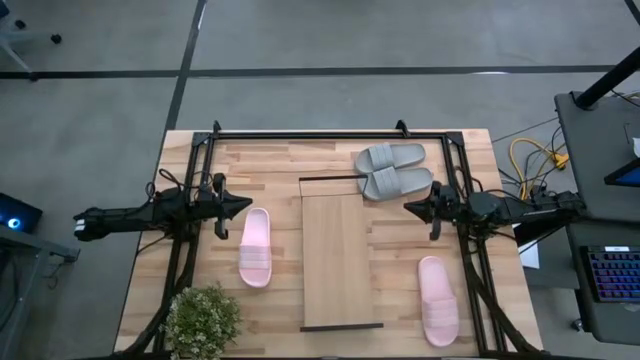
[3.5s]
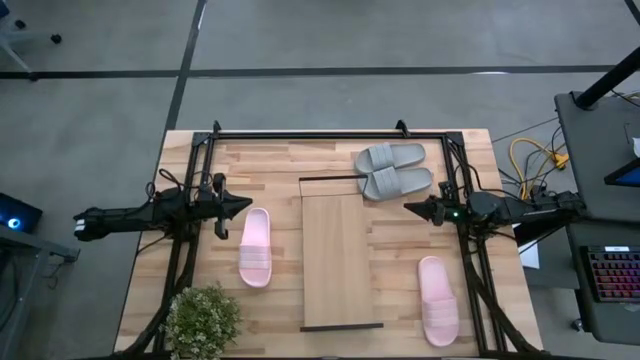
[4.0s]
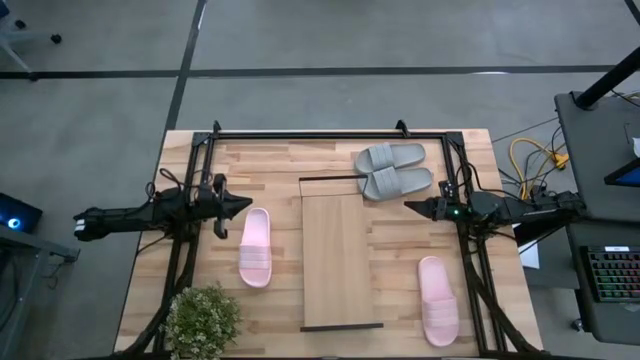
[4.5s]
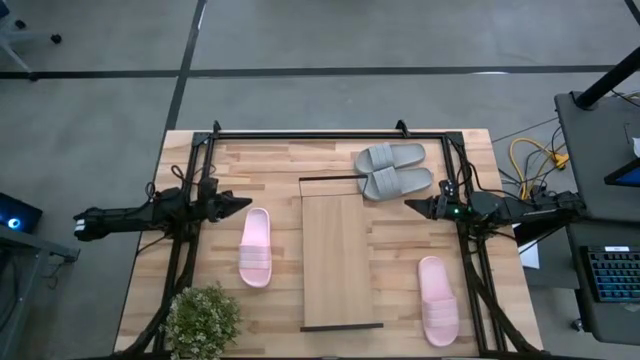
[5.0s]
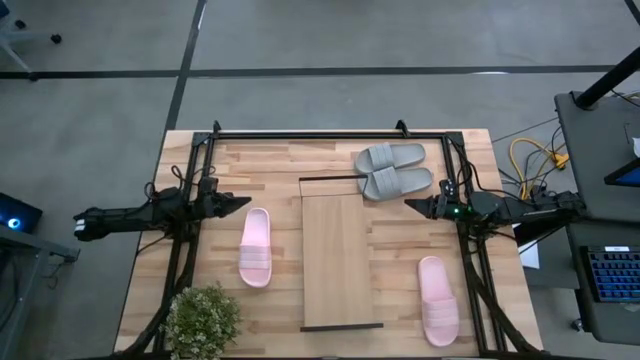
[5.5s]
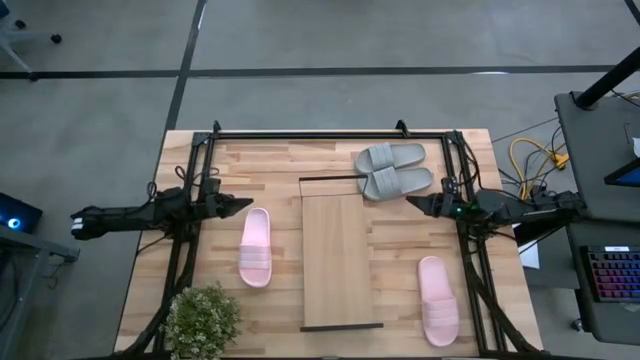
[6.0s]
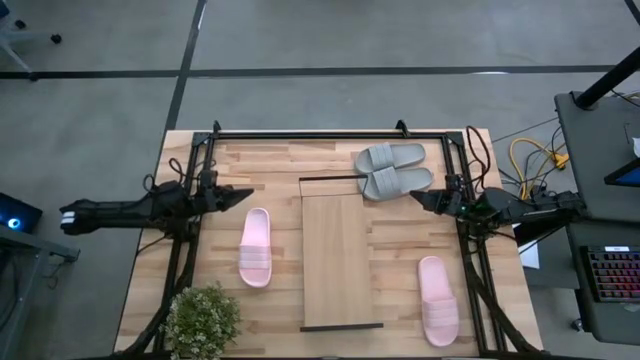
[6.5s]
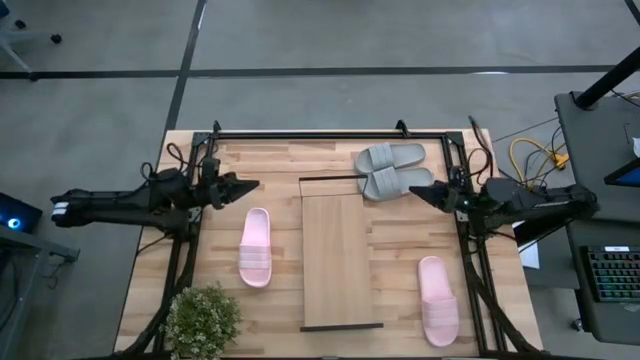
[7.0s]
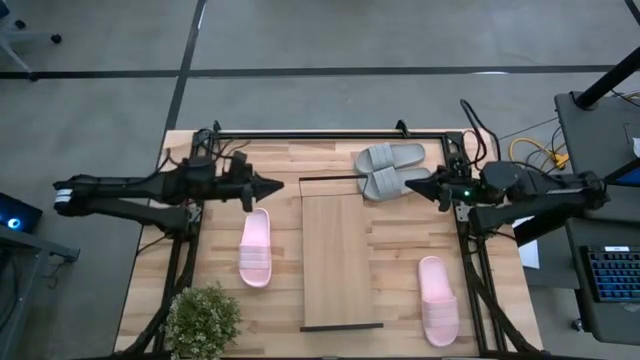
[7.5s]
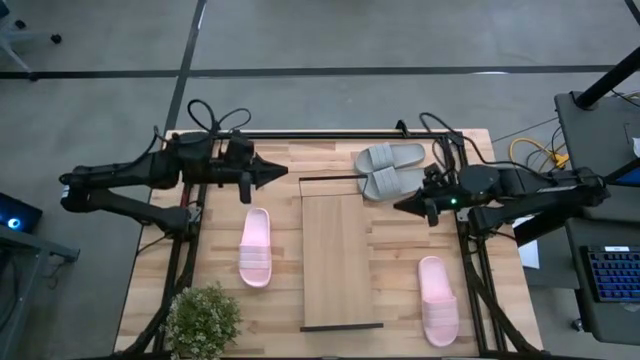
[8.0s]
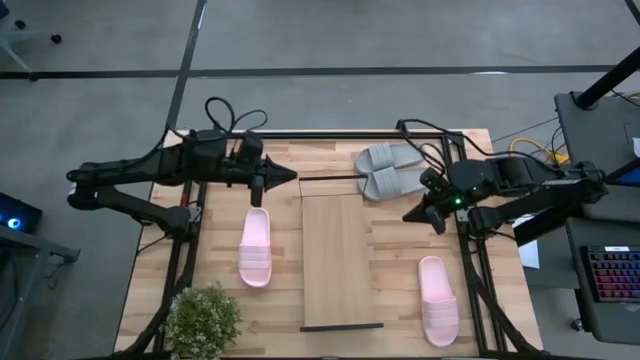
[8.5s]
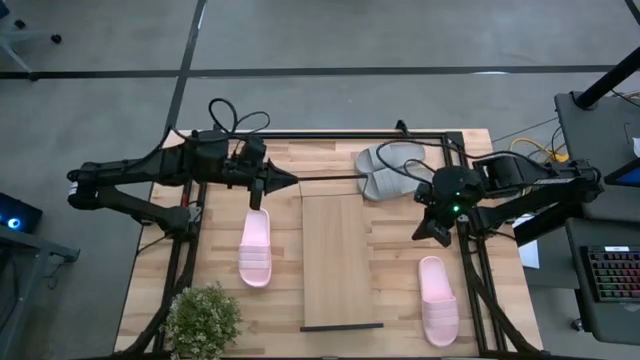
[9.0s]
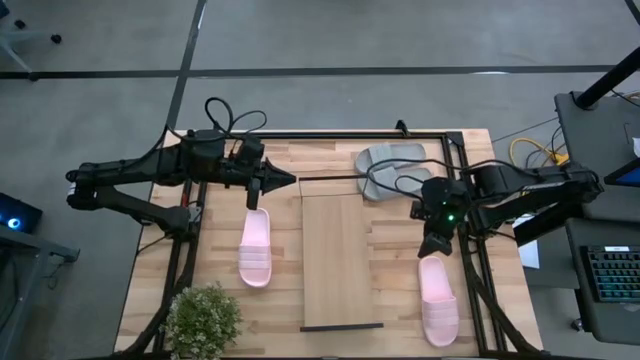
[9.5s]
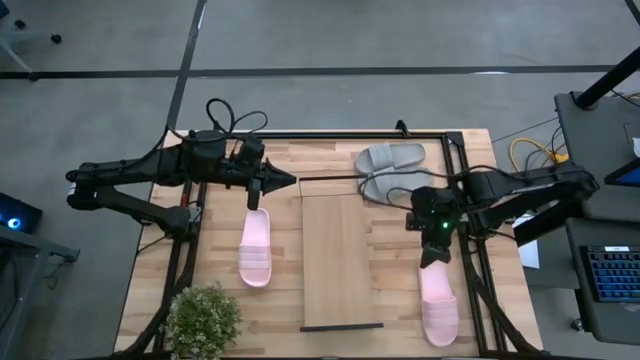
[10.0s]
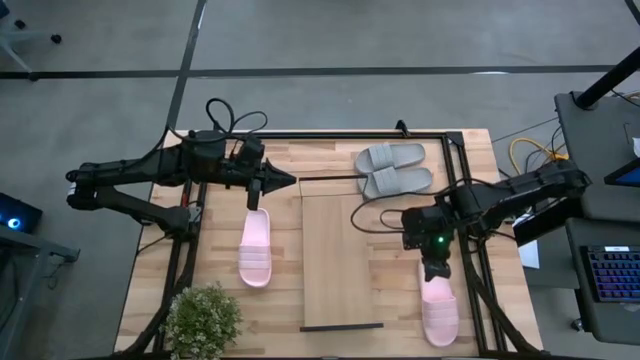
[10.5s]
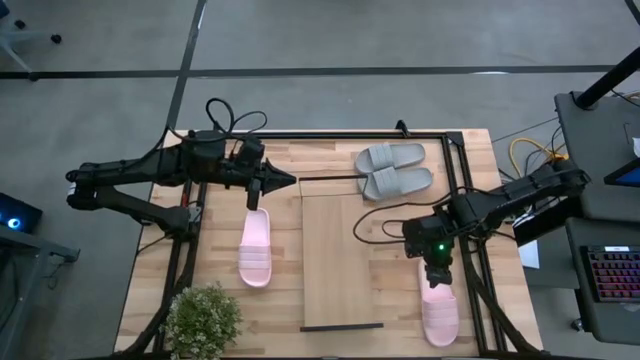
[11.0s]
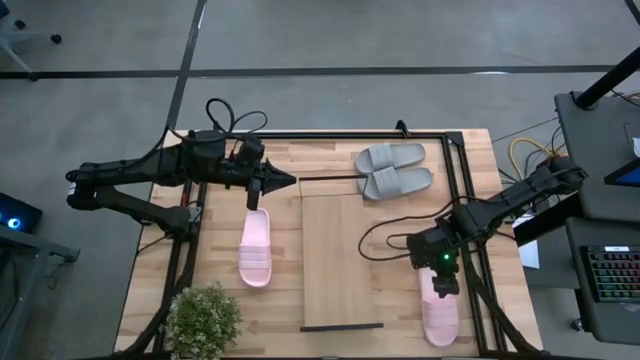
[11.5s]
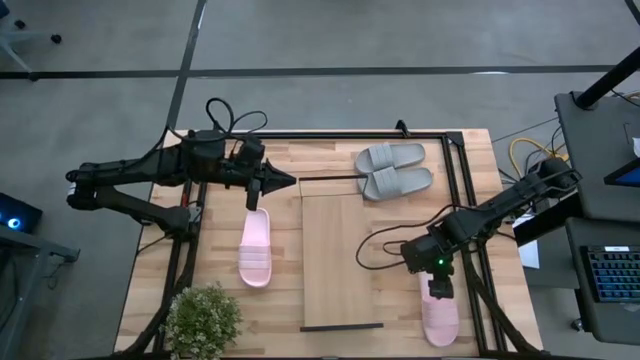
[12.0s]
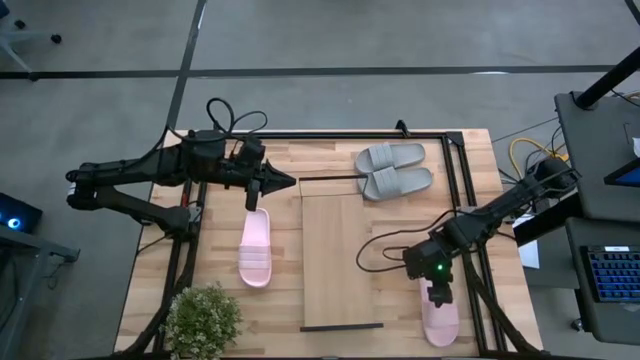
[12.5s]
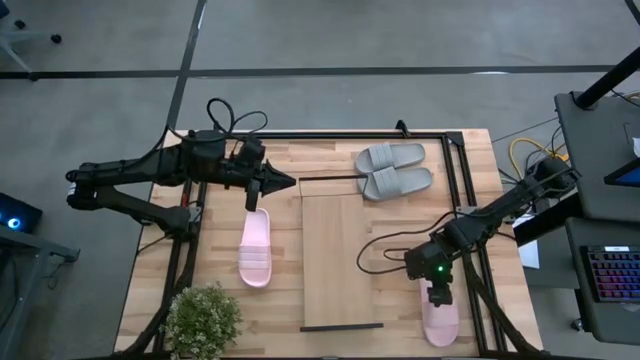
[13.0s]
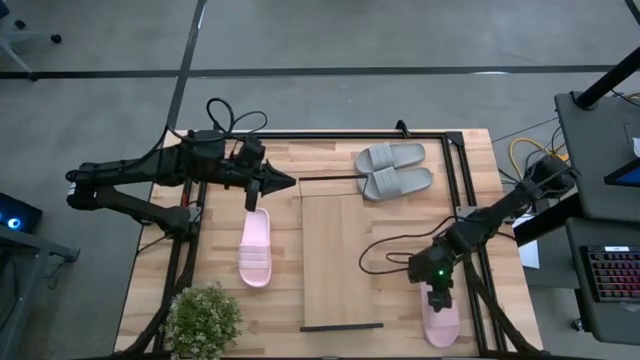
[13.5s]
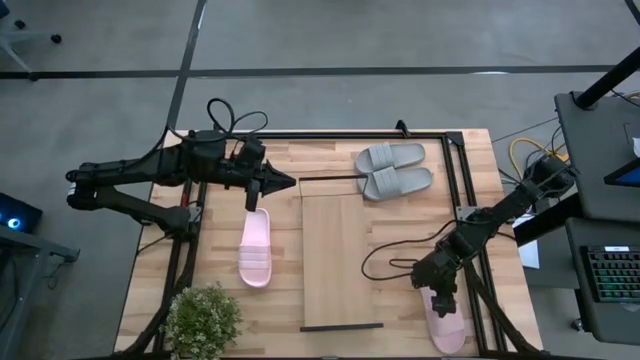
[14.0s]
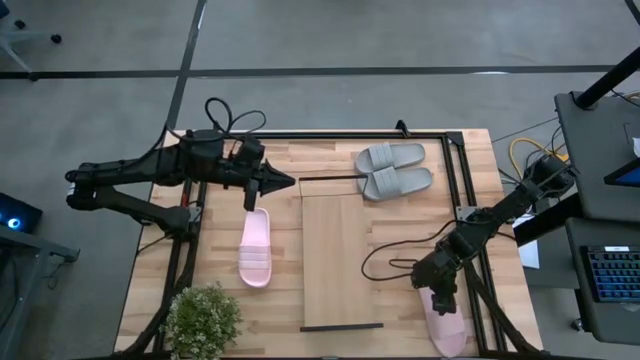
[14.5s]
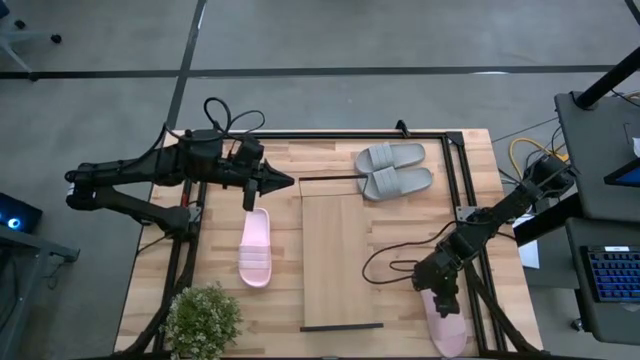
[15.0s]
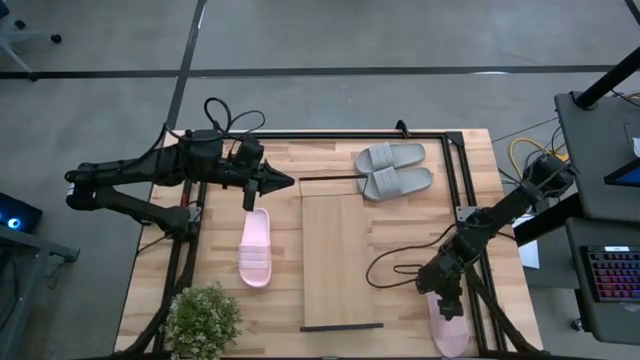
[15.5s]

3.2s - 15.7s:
Task: Pick and place slides into the shelf
Put the right pink slide on the shelf

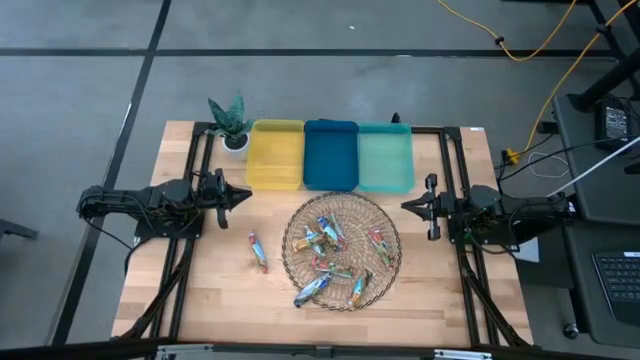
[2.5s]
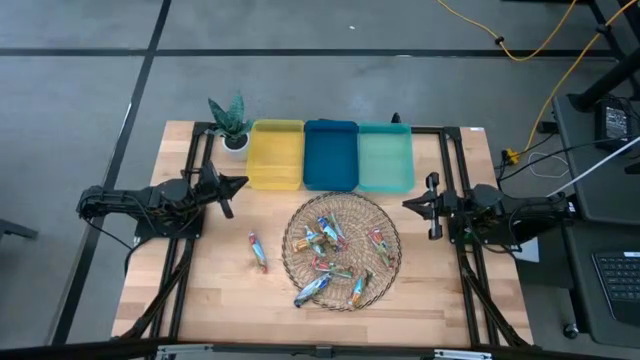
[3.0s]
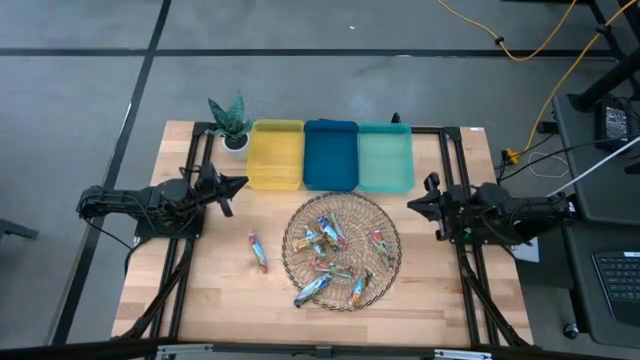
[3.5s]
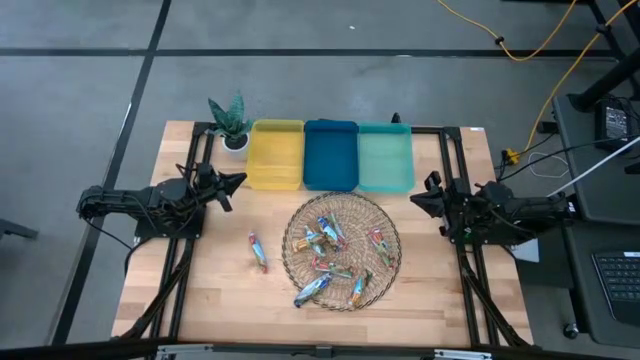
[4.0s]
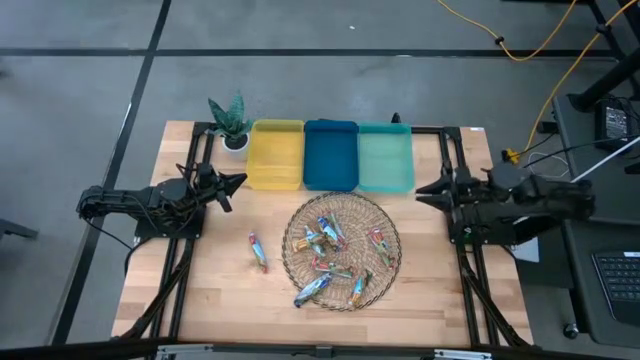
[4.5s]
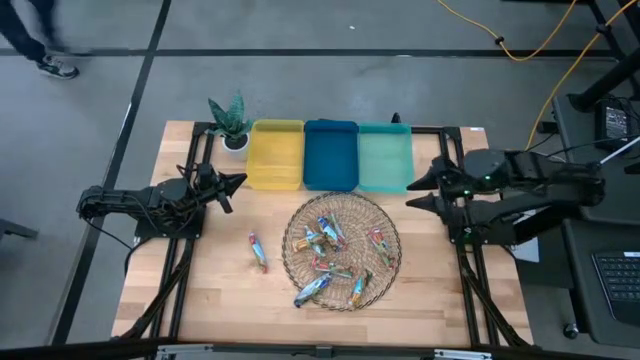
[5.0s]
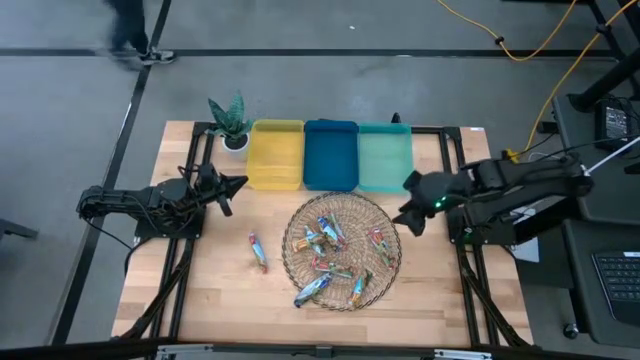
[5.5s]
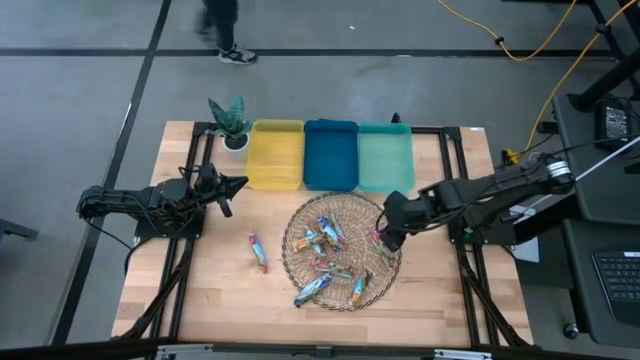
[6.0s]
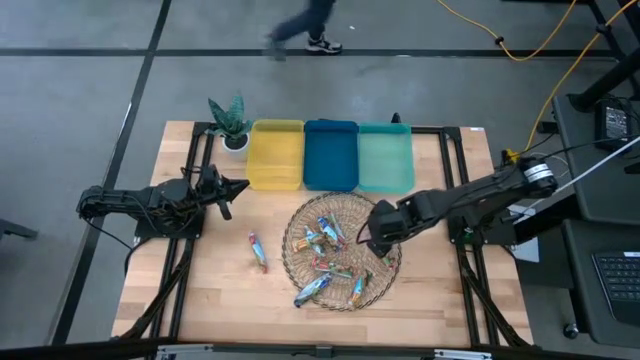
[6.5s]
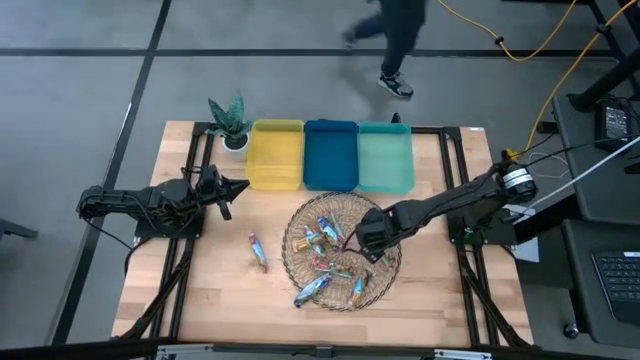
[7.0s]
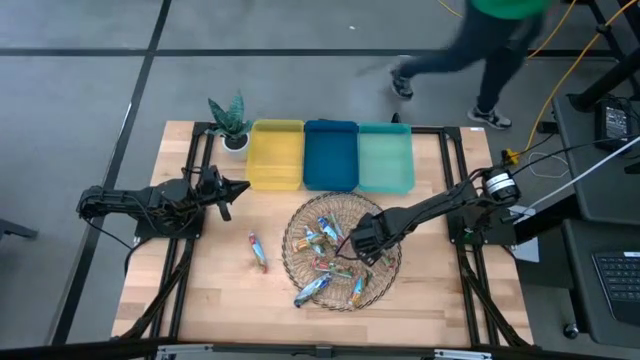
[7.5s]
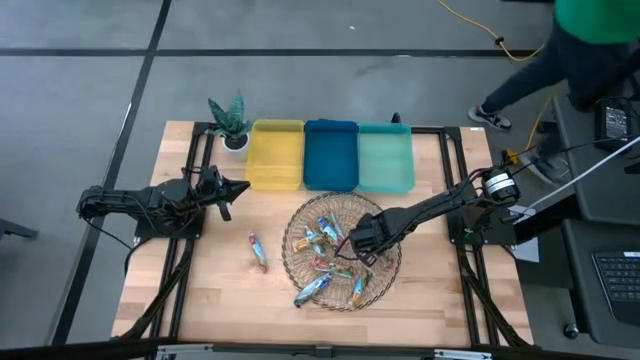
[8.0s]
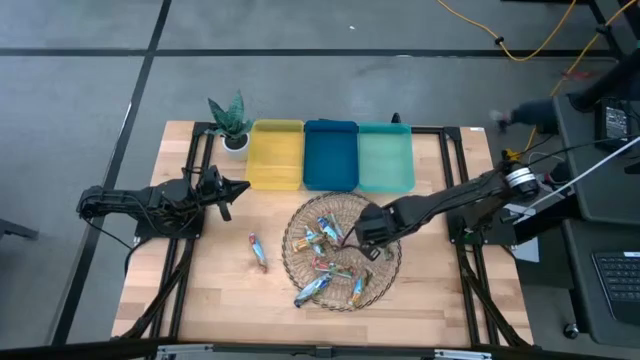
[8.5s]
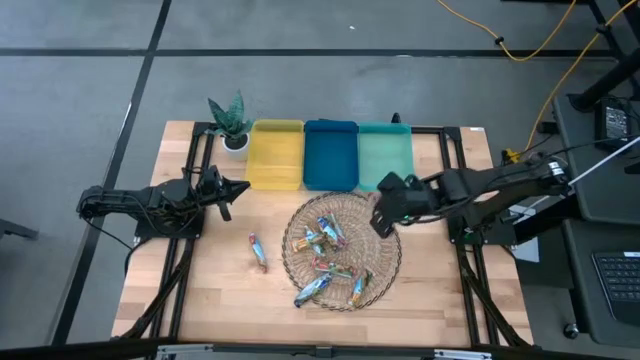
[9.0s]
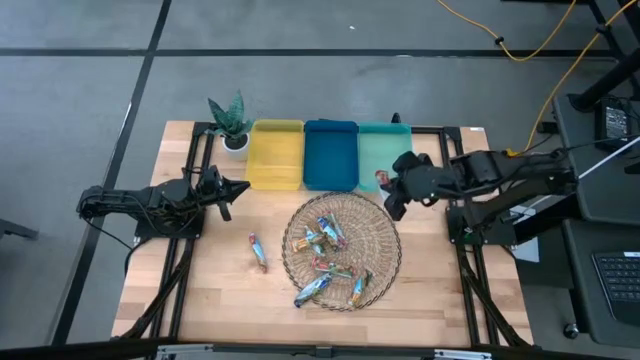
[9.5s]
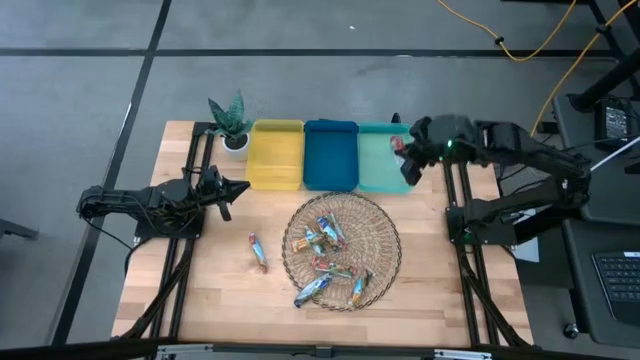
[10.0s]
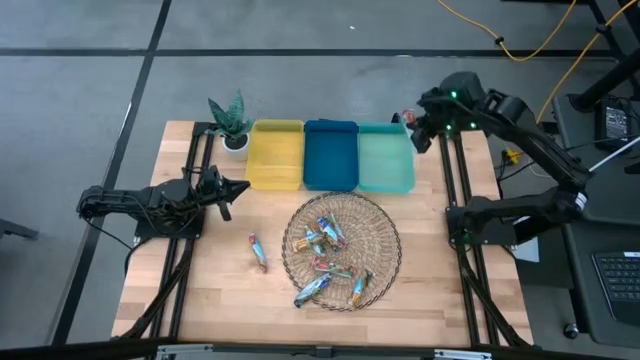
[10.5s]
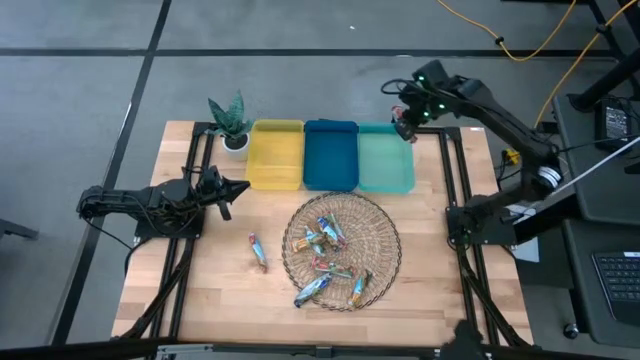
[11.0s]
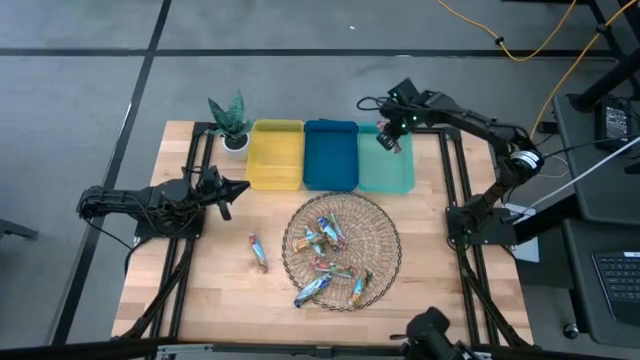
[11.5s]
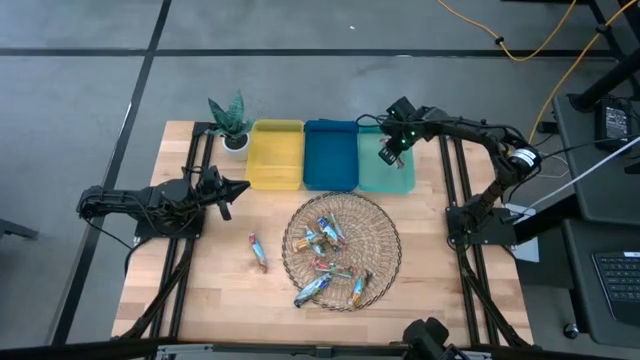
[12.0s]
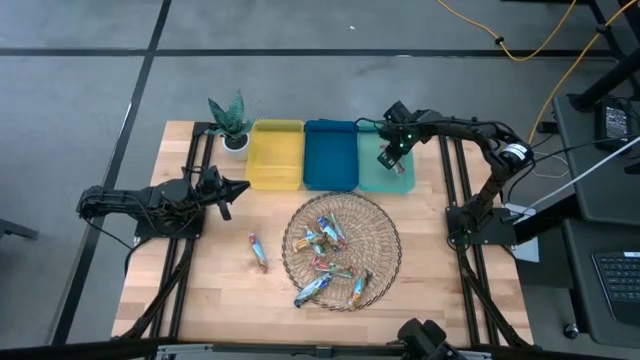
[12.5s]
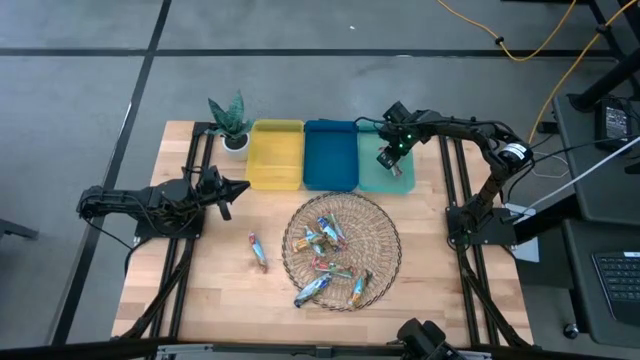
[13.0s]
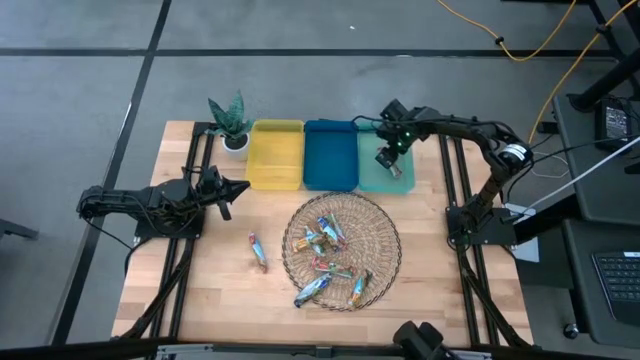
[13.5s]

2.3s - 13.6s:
Task: Pick and place Granola Bars by type
Put the red granola bar into the green bin
